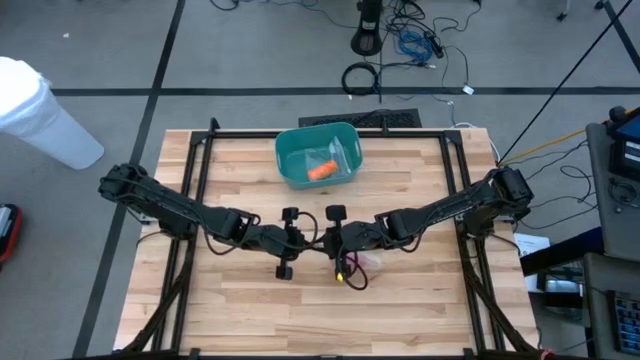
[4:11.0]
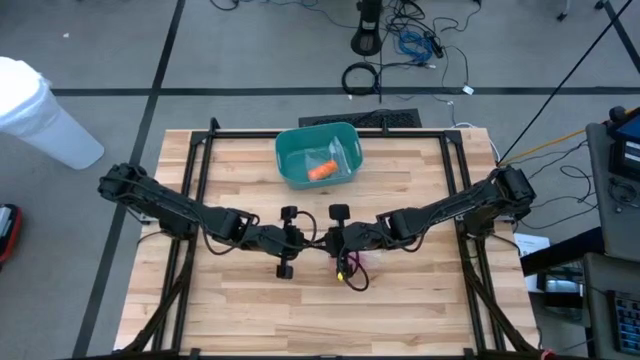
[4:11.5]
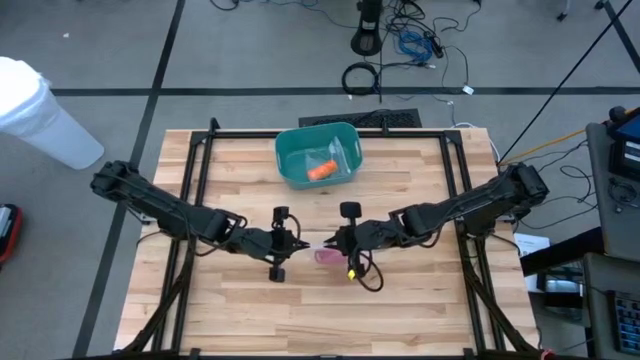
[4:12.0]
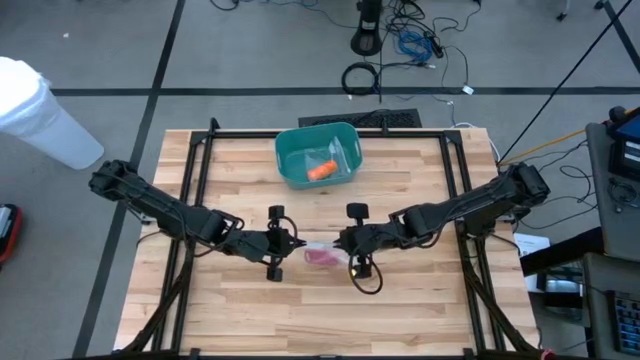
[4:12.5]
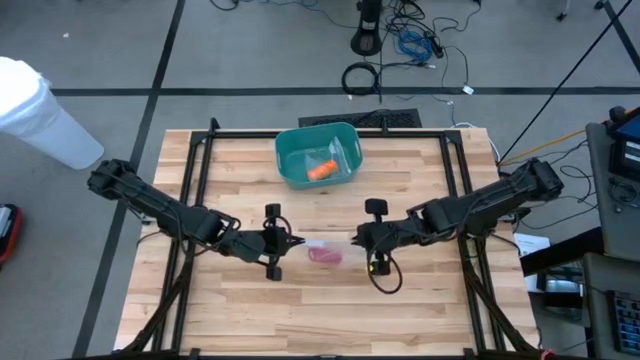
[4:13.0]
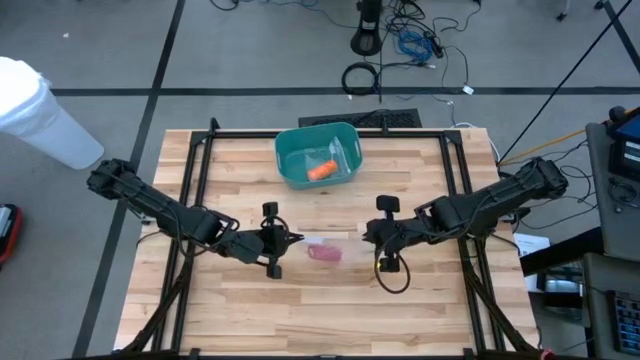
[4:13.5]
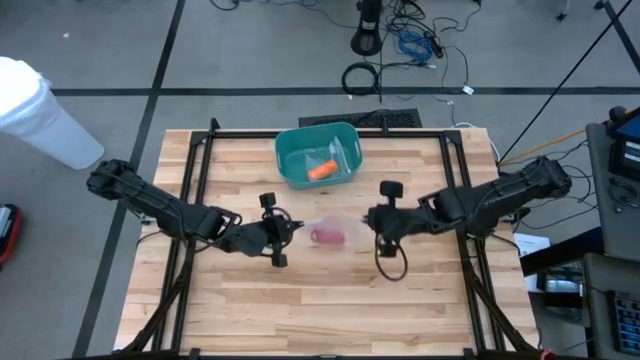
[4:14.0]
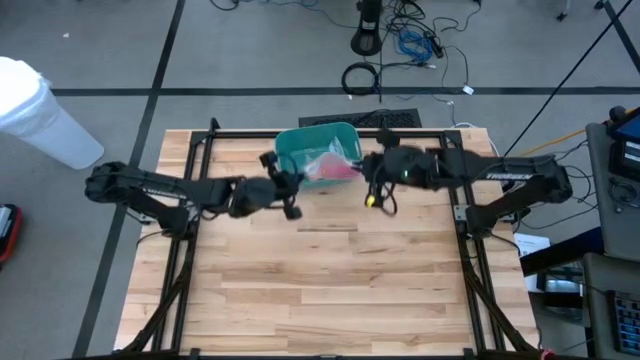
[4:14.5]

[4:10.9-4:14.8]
Task: Roll bandage
Close the transparent zip bag

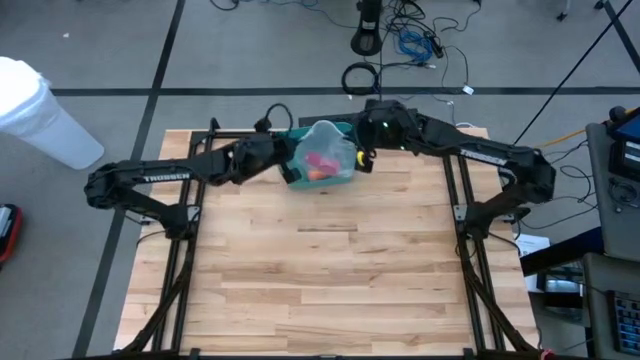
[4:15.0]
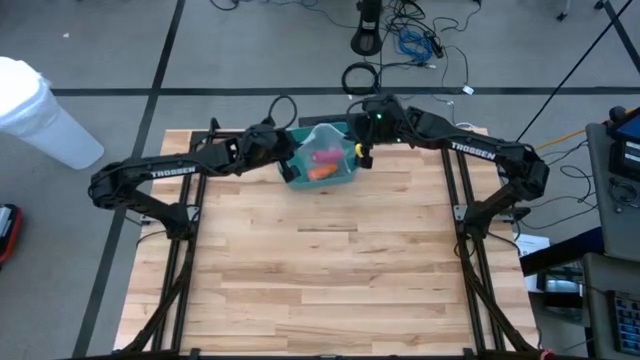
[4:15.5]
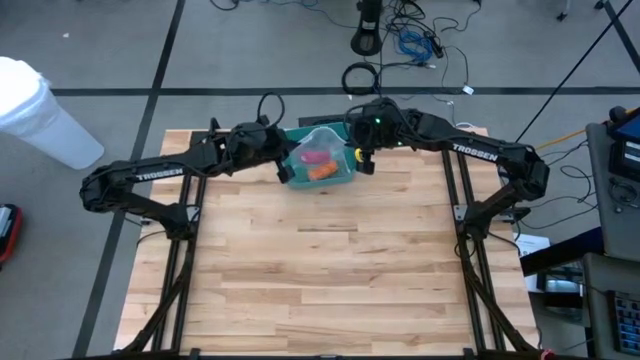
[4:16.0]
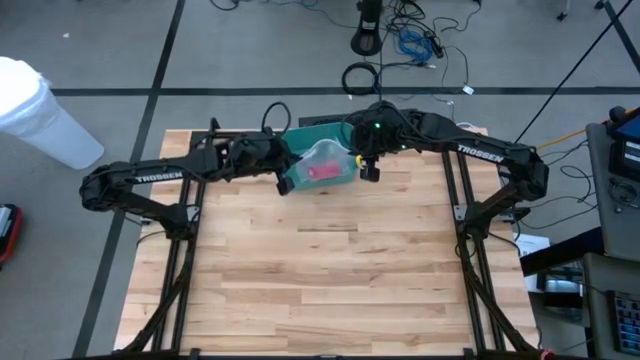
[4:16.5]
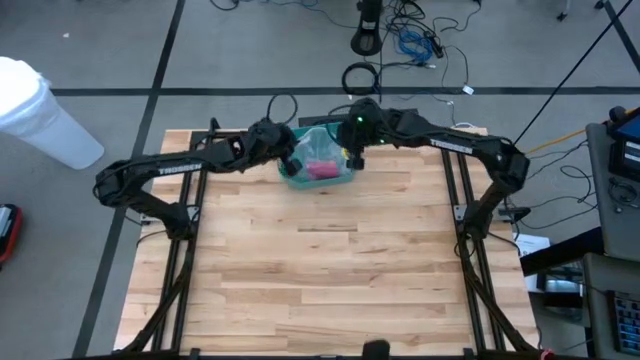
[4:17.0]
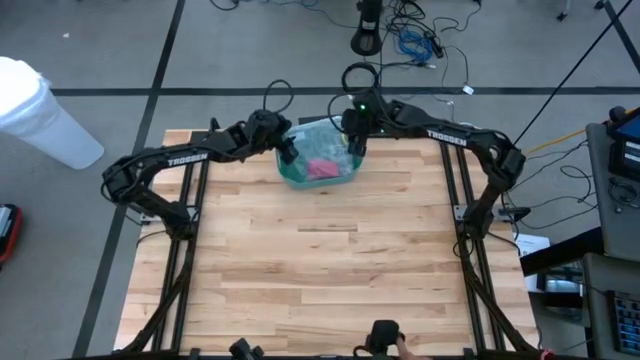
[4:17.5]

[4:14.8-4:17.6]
Put the transparent zip bag into the green bin

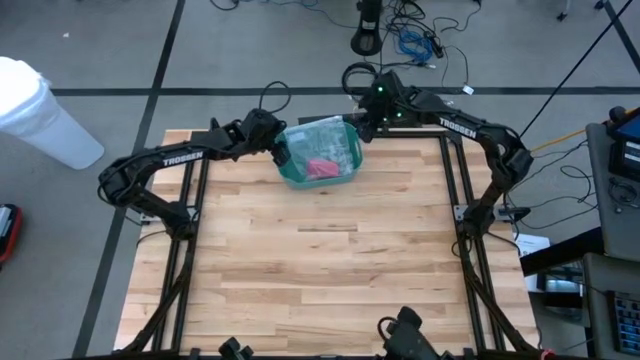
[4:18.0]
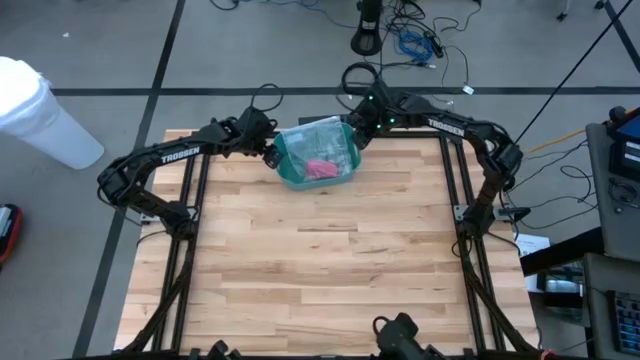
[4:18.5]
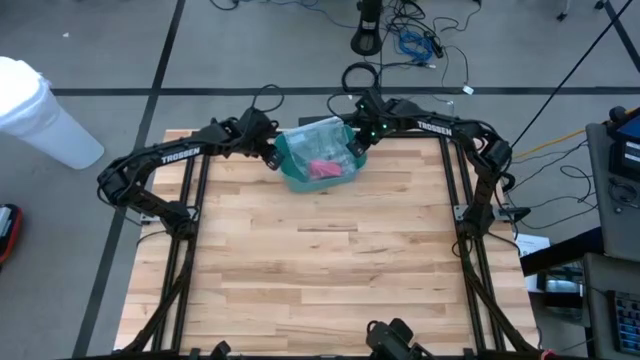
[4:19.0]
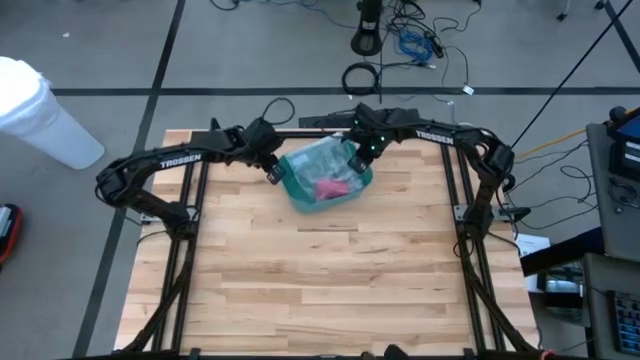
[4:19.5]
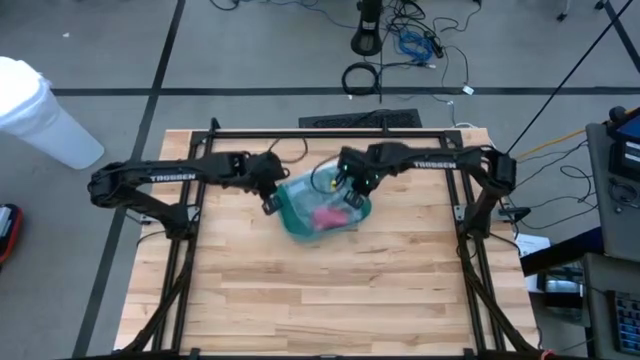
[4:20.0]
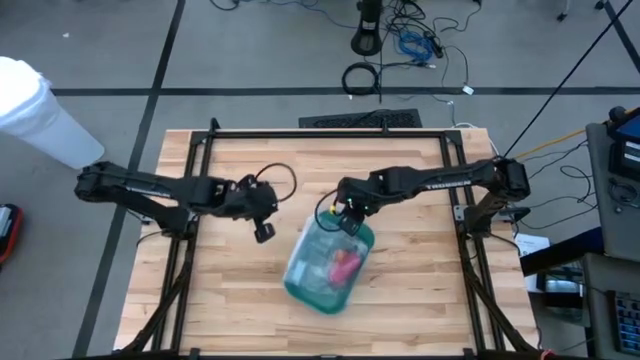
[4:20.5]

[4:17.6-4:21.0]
Move the green bin to the center of the table

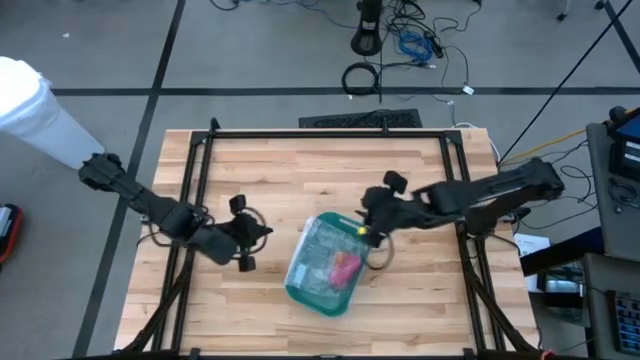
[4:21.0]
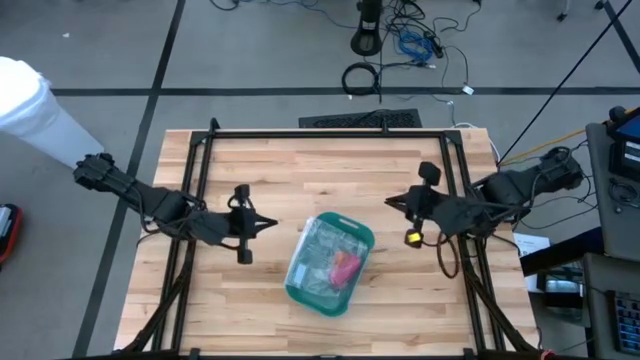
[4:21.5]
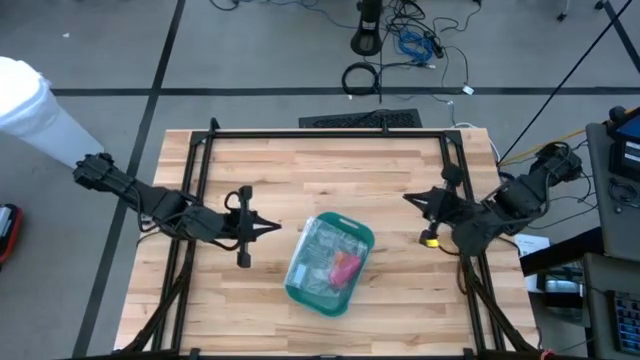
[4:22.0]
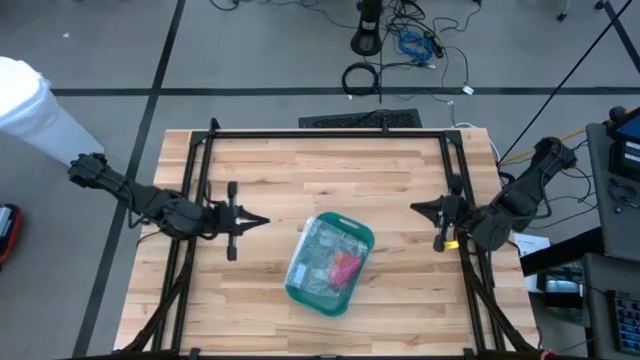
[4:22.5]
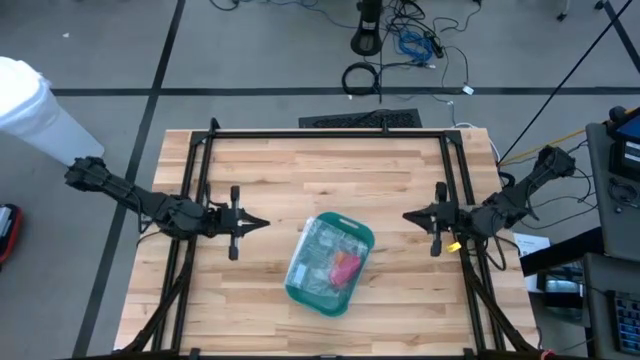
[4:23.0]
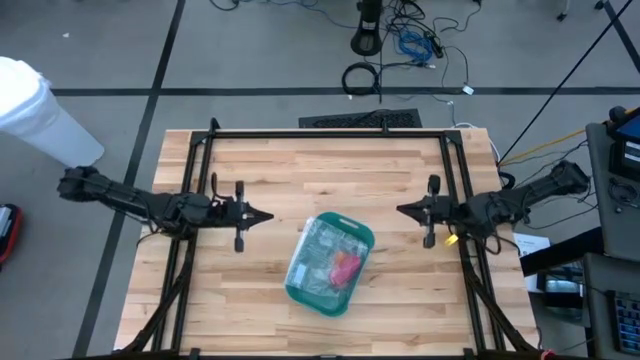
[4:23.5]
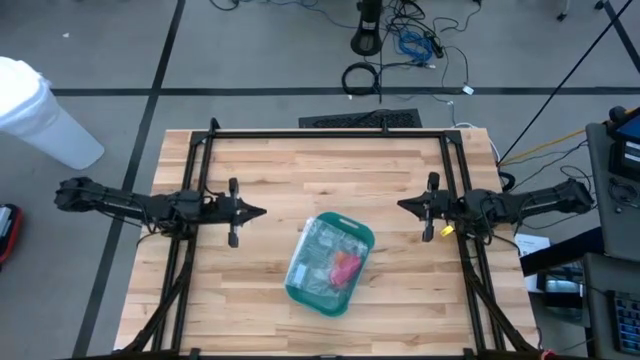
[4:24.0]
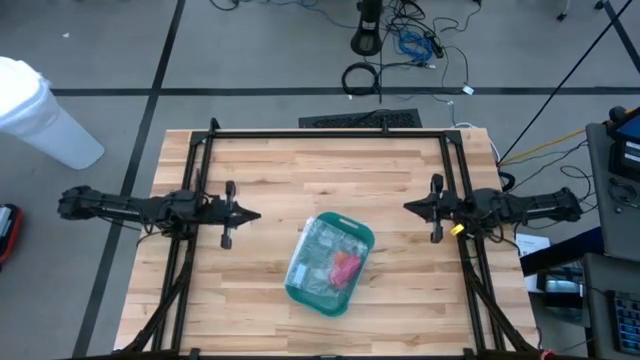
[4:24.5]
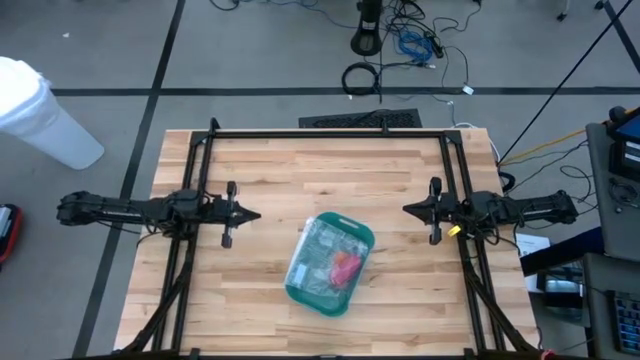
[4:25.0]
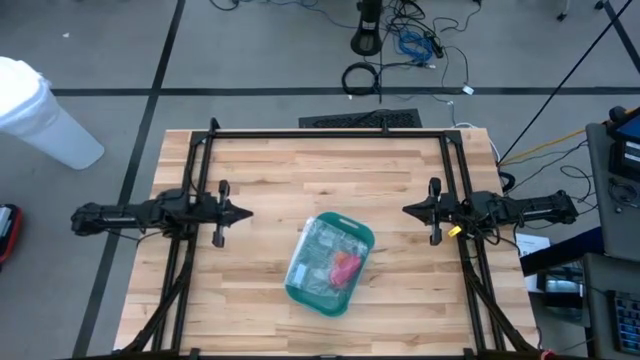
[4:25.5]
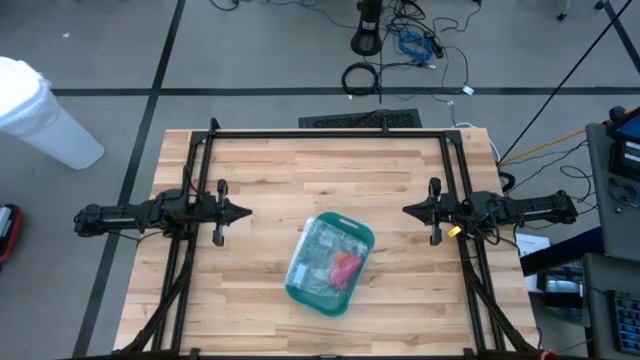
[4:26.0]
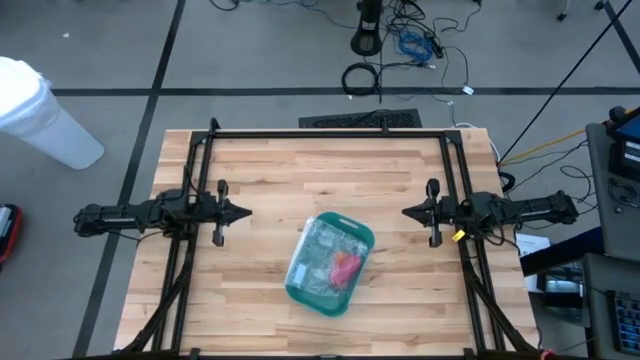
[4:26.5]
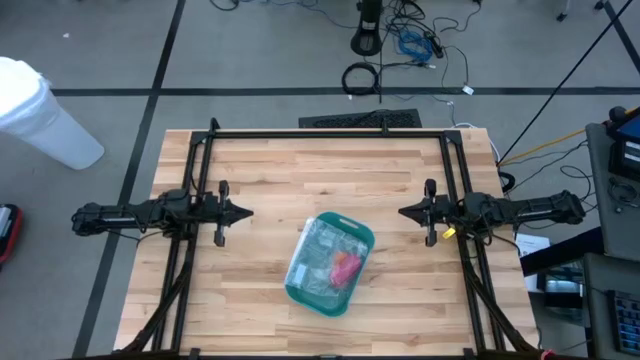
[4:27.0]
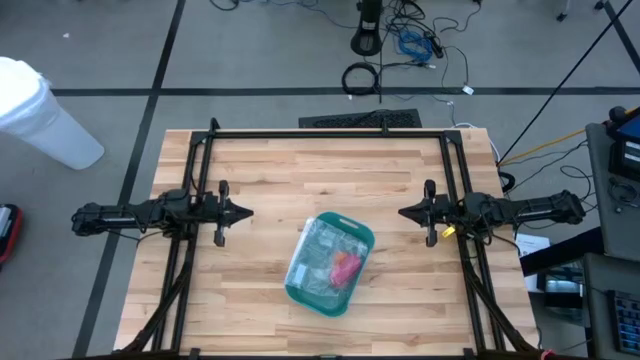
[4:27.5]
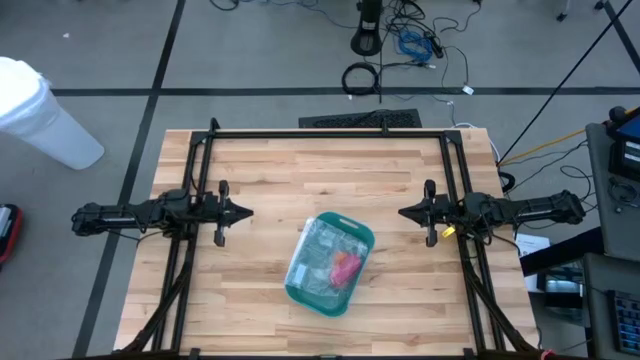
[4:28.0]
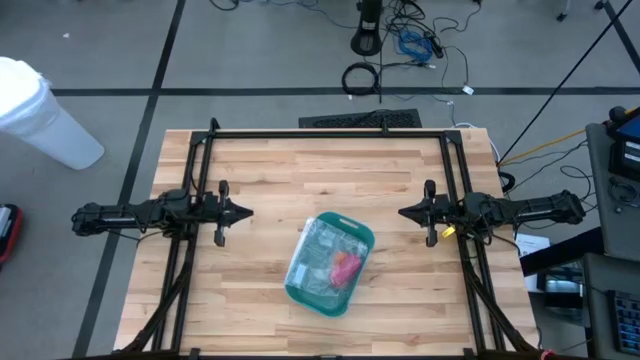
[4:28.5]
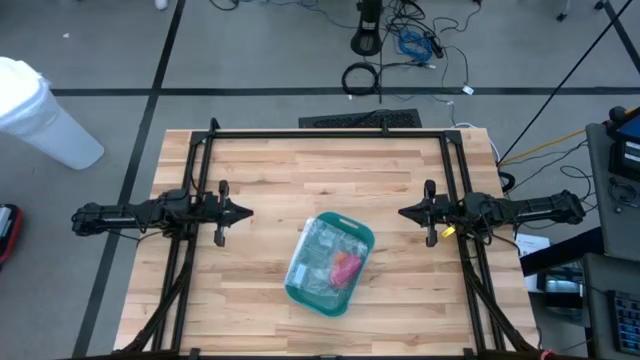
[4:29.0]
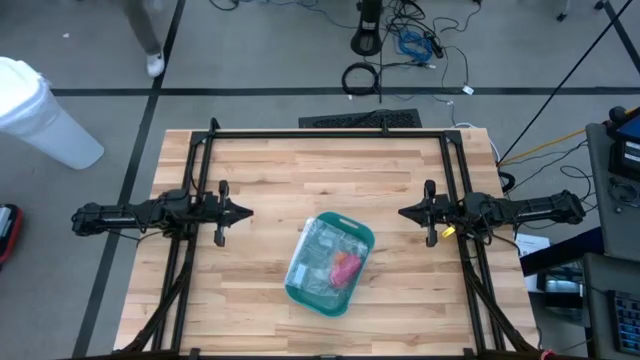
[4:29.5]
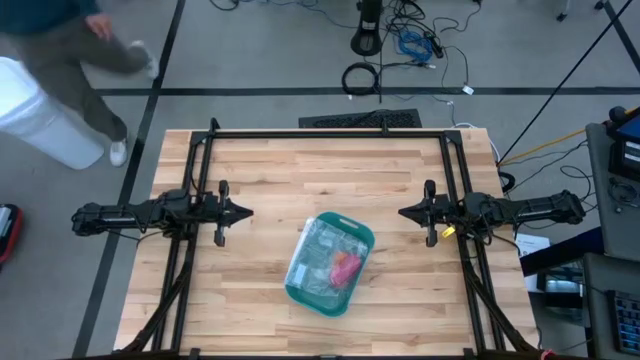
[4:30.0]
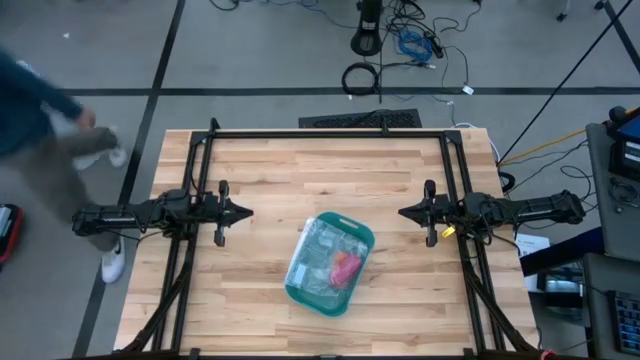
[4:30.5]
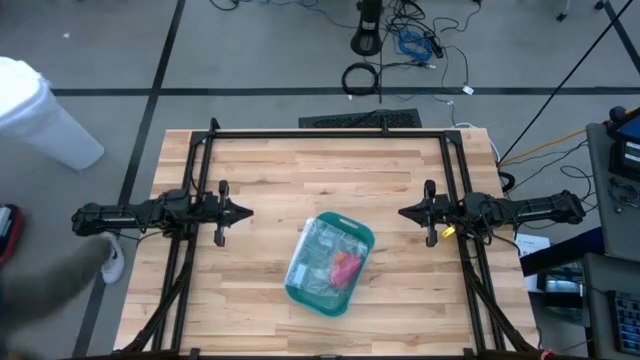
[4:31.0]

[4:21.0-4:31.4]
Return to Home Position
